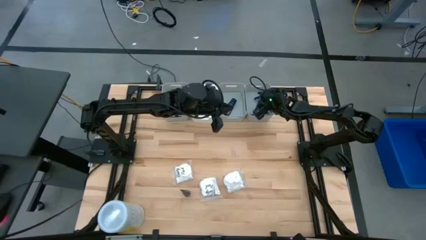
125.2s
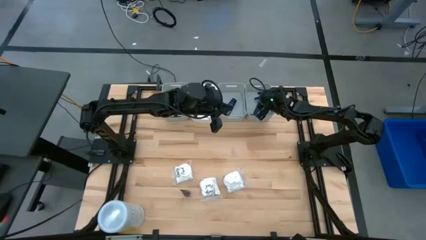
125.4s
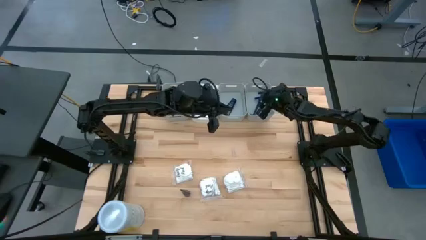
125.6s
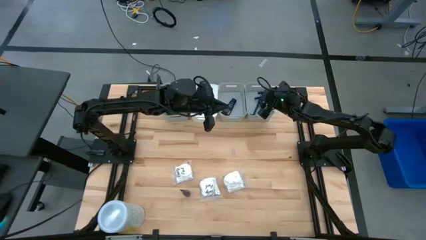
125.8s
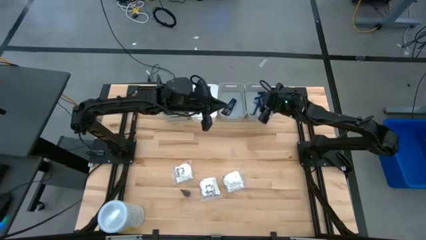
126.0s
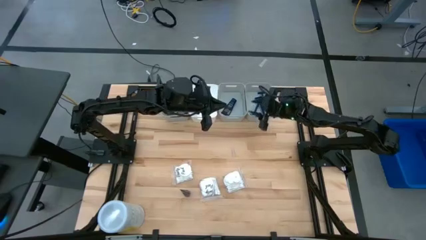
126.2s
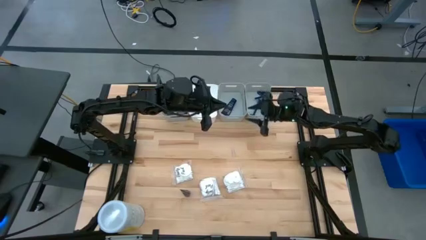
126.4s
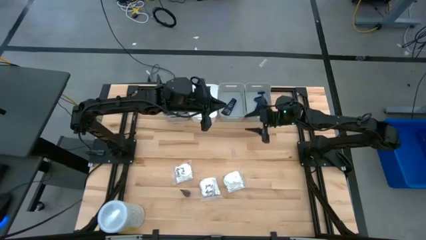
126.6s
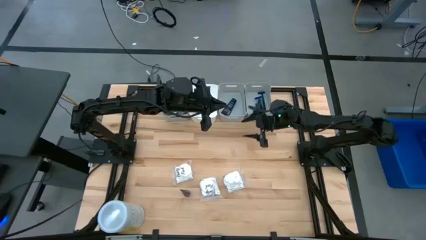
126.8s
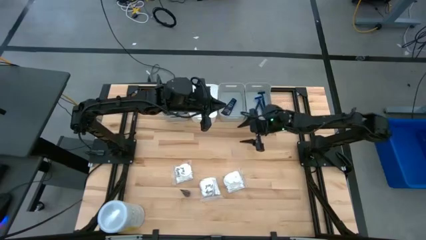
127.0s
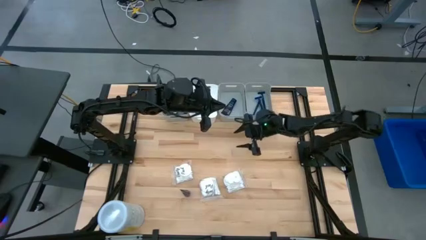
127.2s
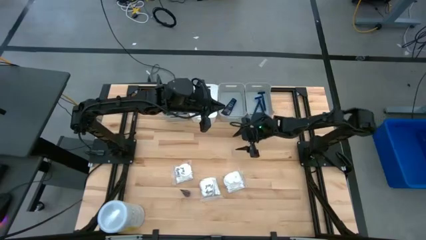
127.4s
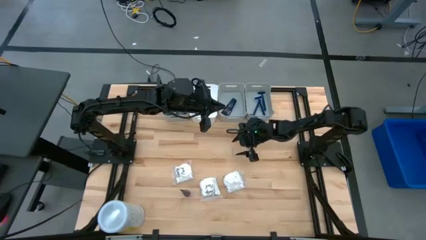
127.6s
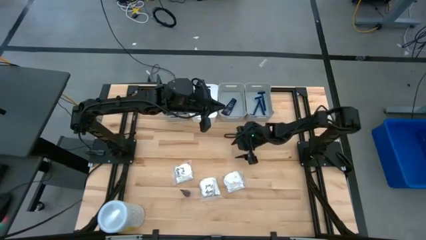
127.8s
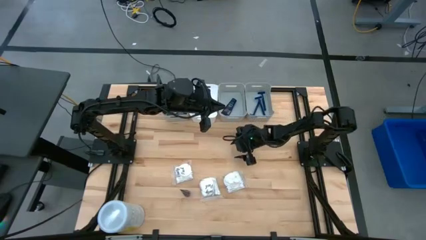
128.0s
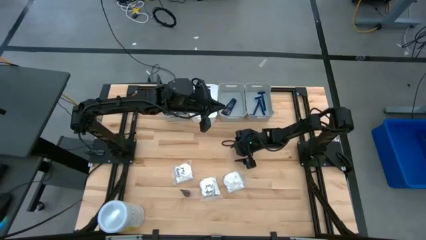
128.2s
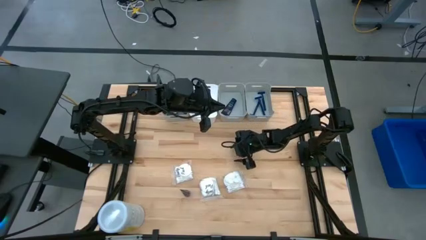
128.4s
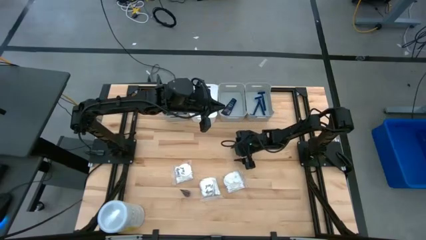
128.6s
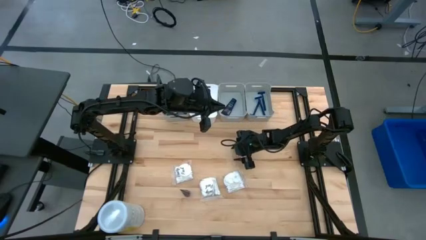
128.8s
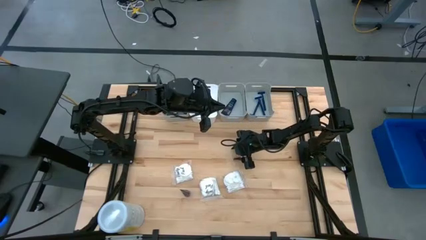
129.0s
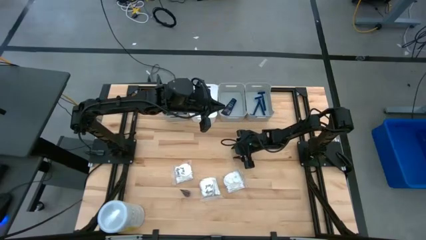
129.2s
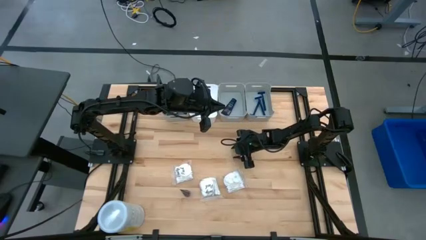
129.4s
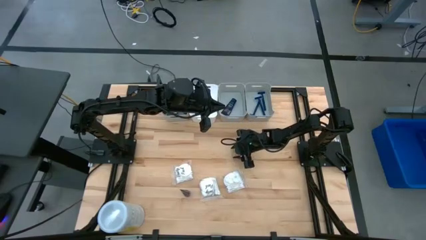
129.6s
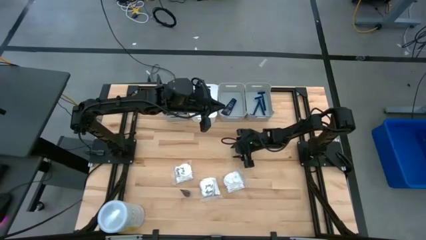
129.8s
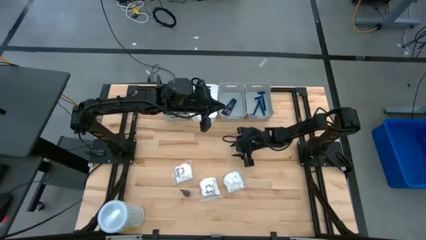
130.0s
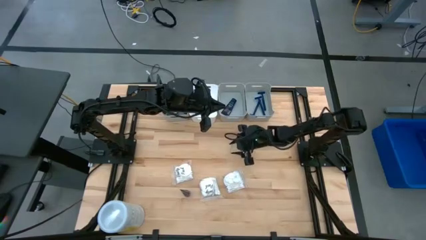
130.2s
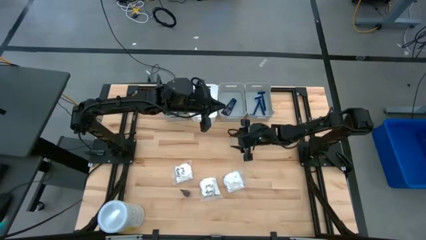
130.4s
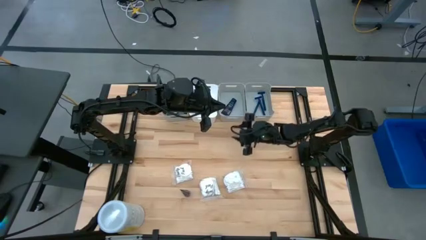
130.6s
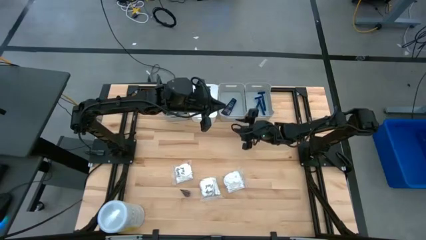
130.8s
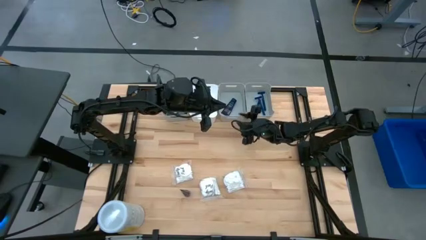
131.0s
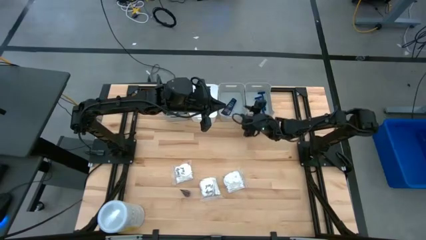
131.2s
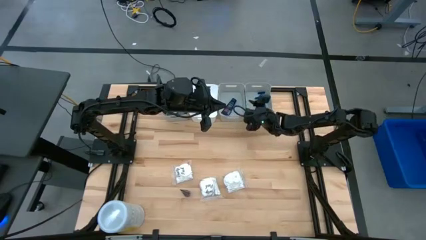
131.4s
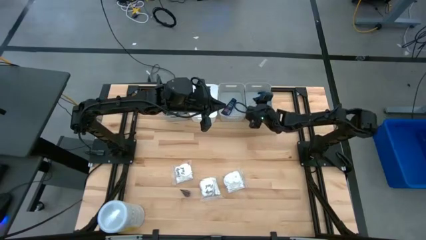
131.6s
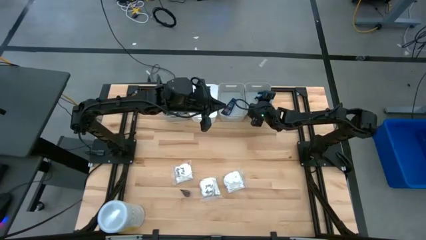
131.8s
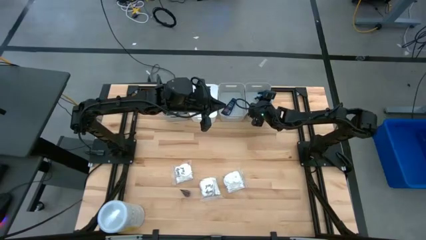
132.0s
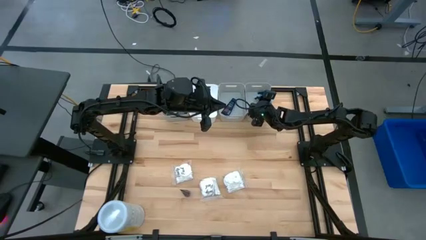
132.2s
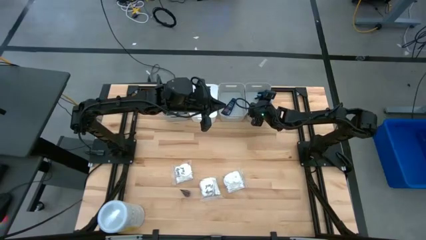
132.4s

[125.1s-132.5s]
Task: Pick & Place Travel size toiletries
Put the transparent razor cover into the right gray bin

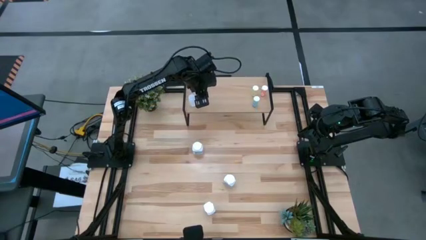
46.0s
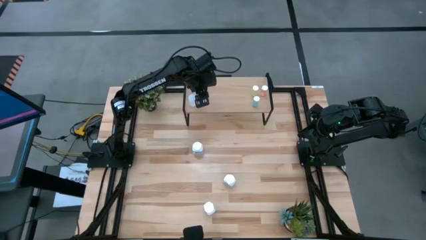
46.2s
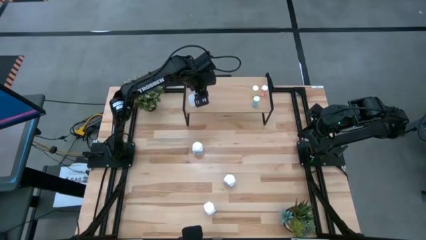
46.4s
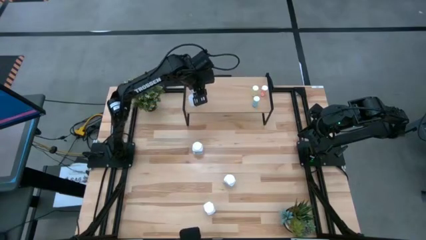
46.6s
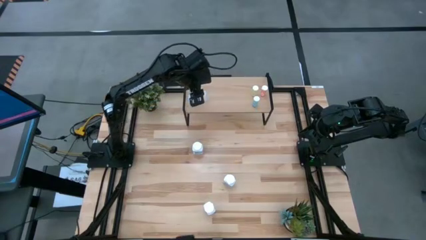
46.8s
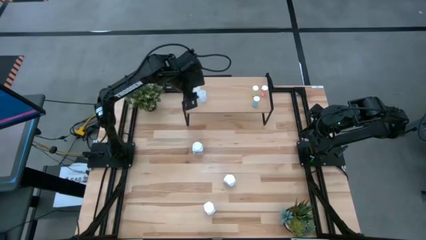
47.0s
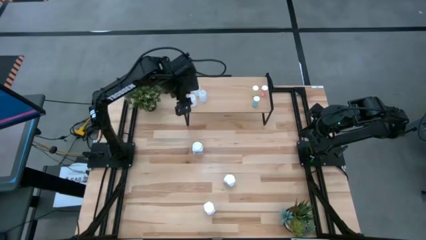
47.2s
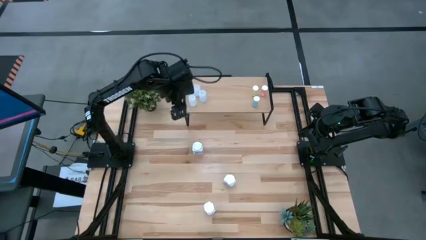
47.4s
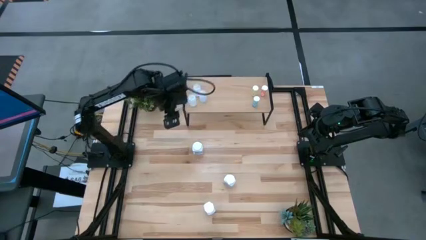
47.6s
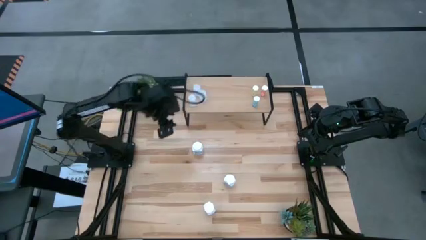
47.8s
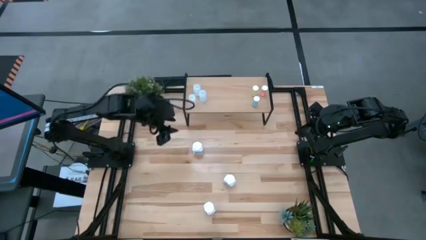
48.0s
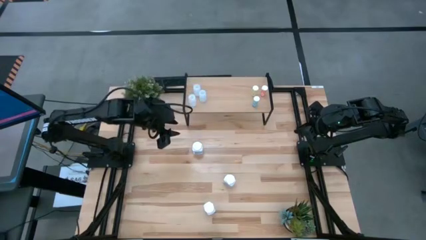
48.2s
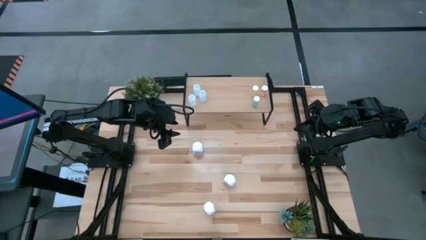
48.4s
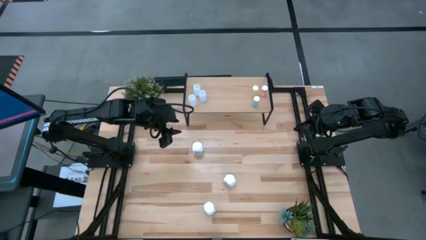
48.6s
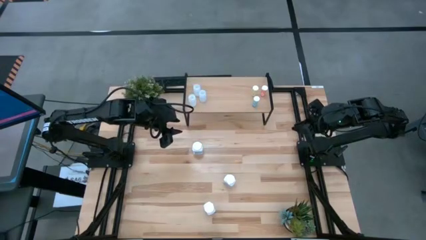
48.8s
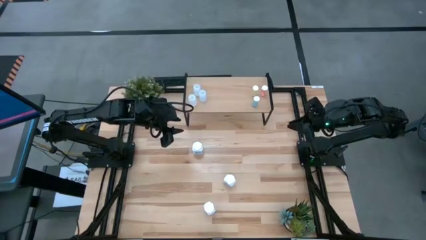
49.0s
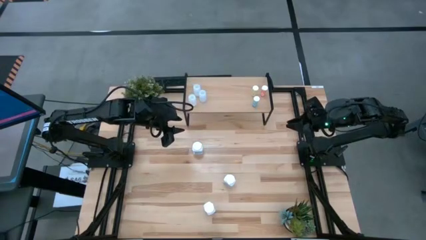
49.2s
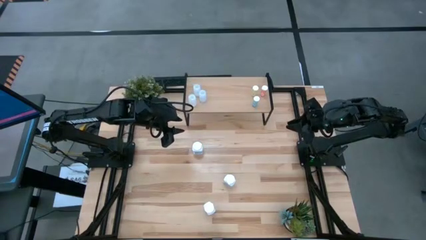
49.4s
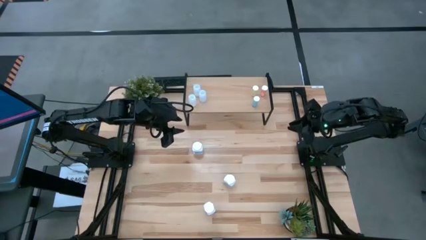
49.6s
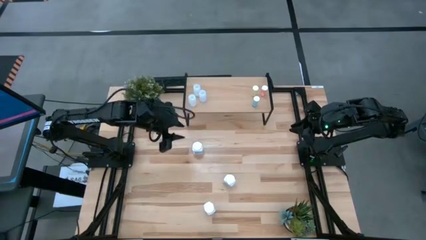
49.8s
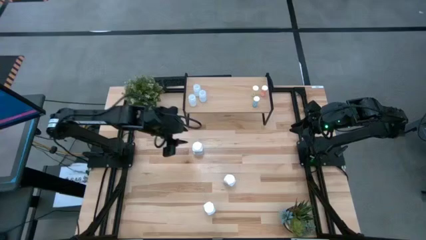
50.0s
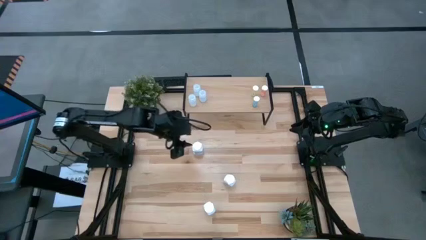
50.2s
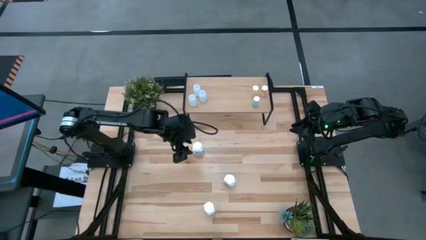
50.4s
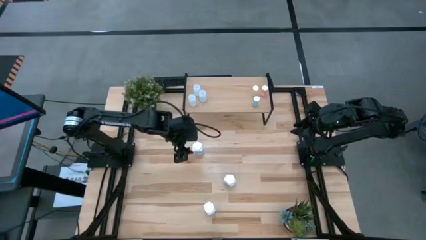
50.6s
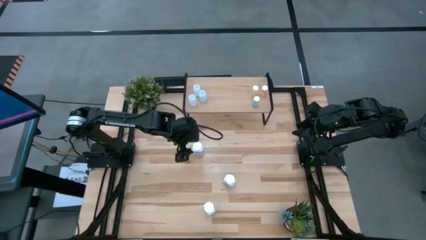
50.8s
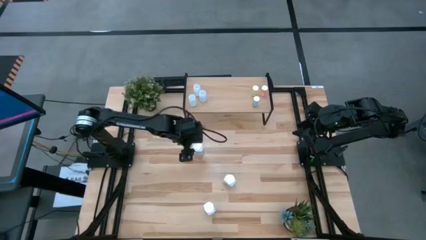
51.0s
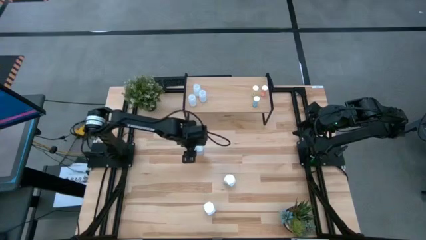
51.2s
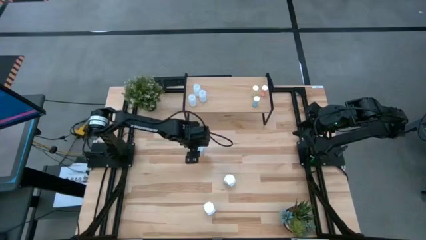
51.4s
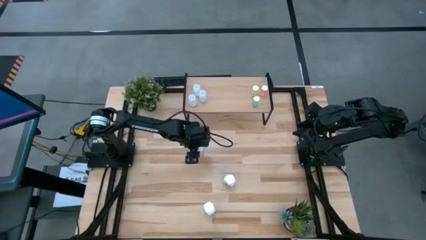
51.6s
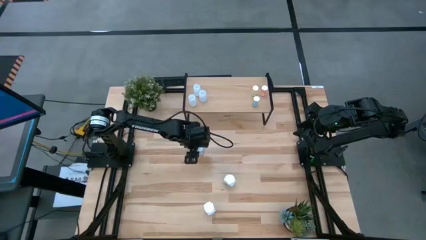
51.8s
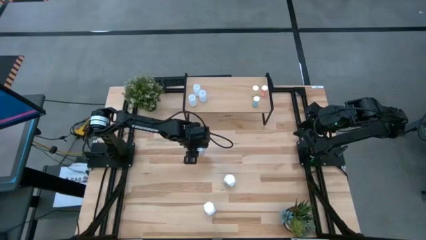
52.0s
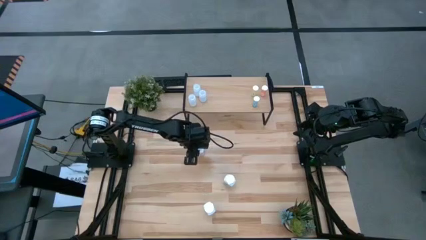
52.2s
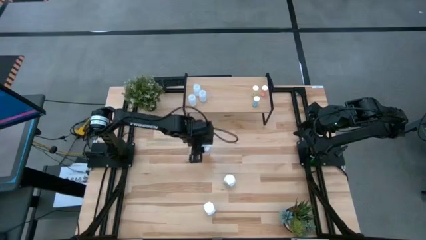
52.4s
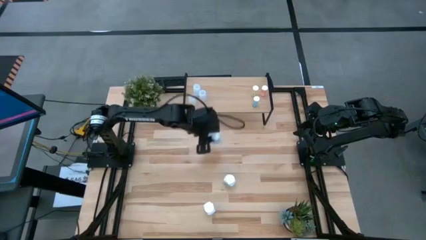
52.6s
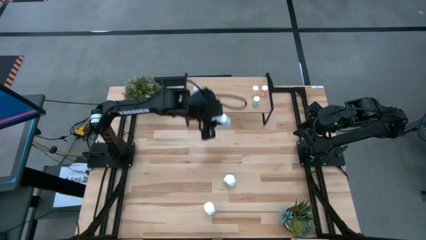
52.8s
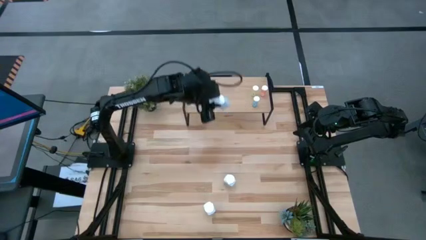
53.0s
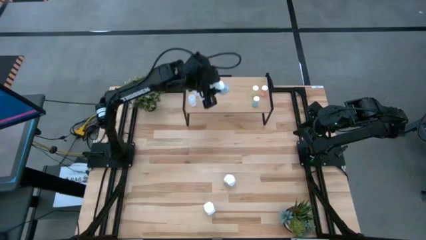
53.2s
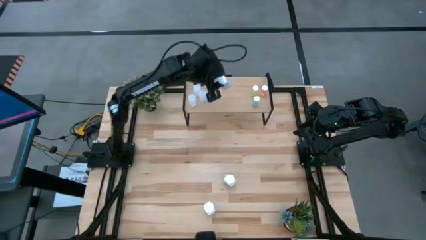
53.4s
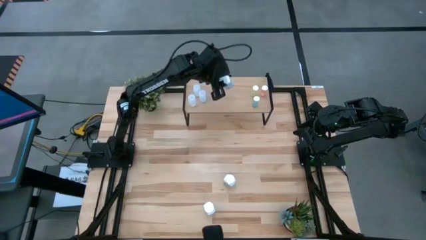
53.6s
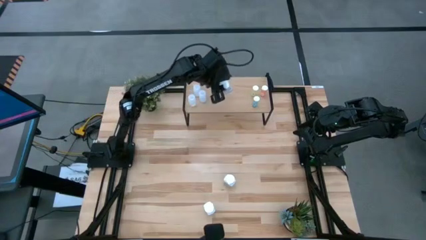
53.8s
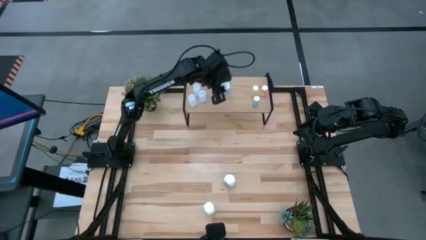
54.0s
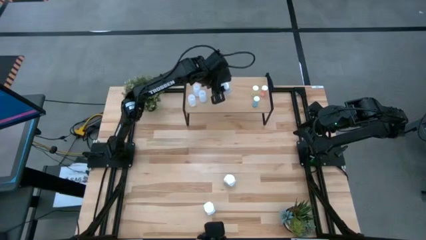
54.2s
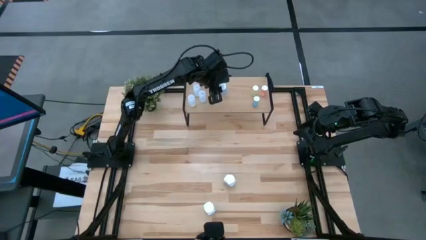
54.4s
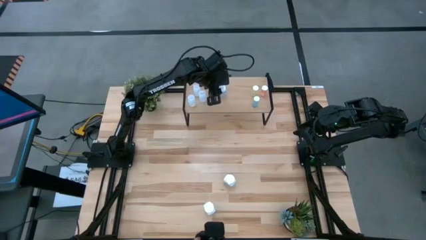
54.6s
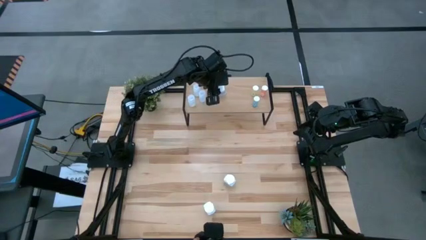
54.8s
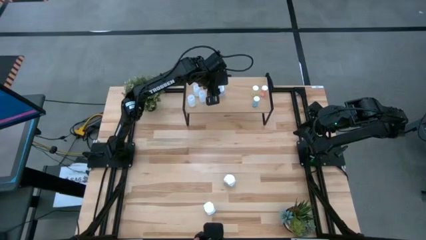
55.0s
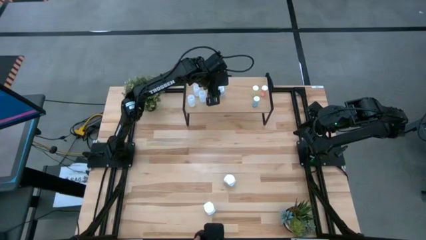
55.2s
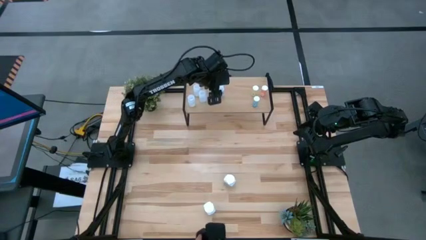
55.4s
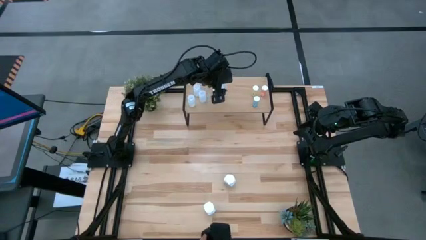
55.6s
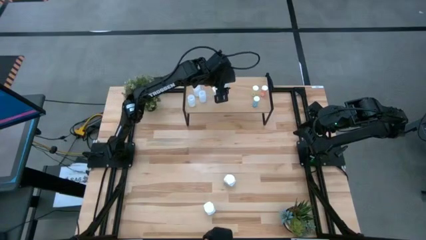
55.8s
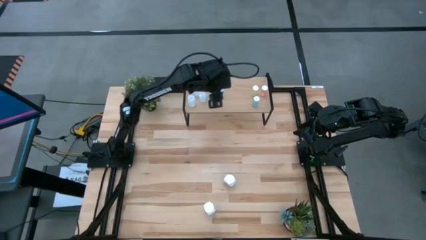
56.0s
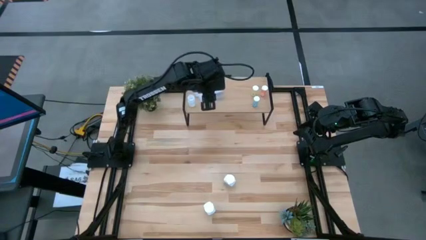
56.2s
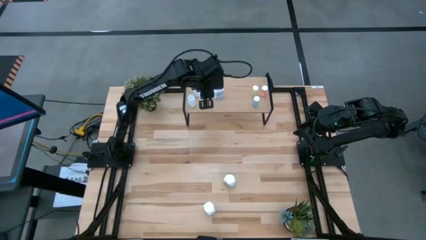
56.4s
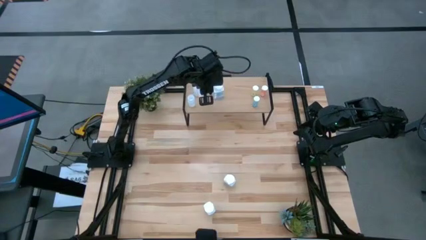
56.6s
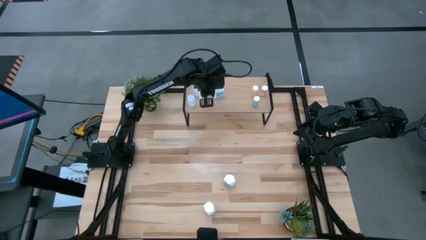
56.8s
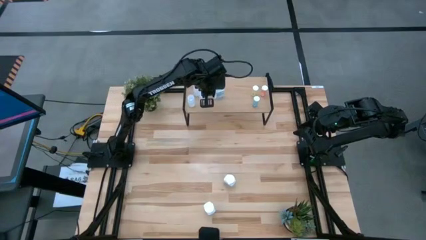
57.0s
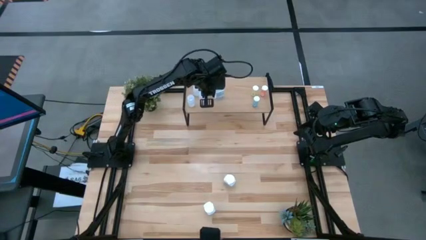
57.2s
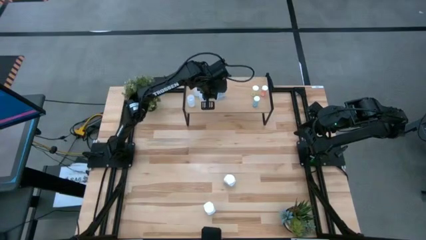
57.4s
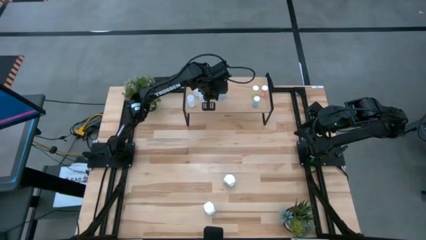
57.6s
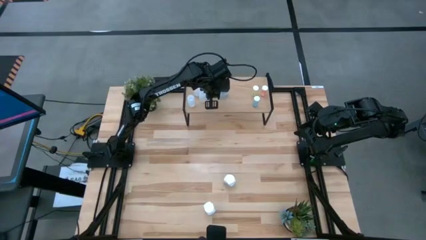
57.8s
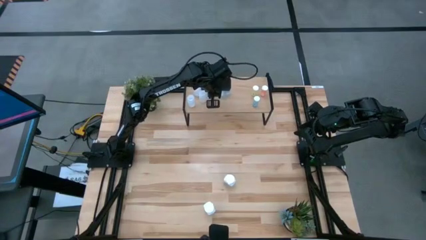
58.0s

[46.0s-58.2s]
Task: Pick and place medicine bottles onto shelf by color
Put the top white pill bottle on the shelf
